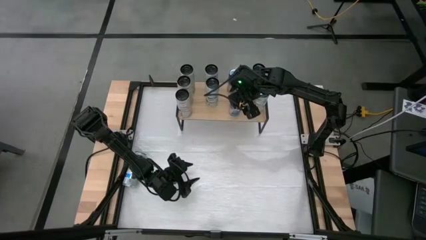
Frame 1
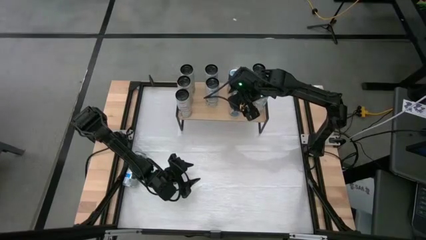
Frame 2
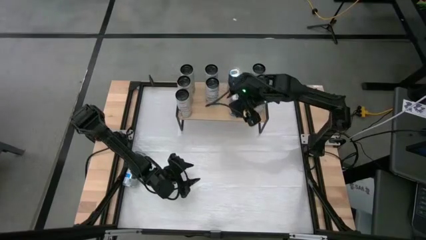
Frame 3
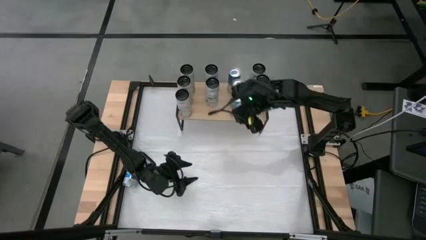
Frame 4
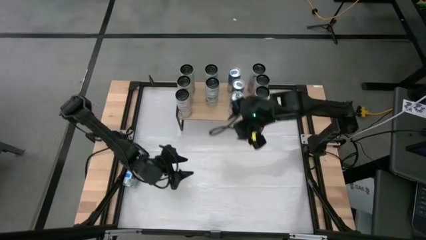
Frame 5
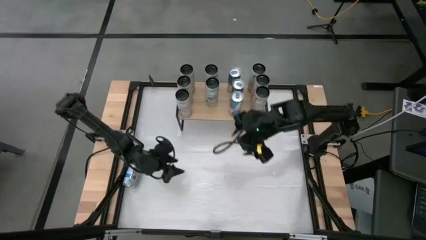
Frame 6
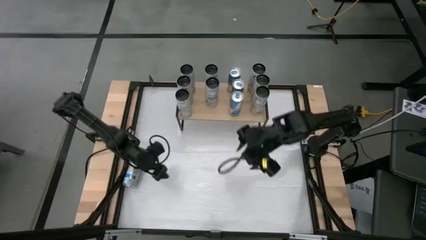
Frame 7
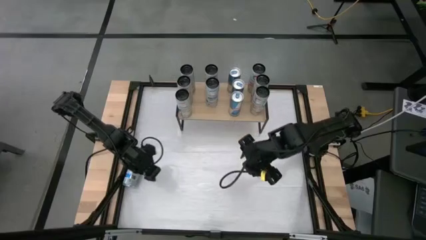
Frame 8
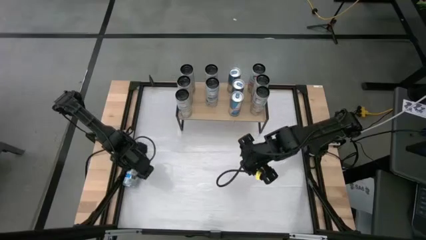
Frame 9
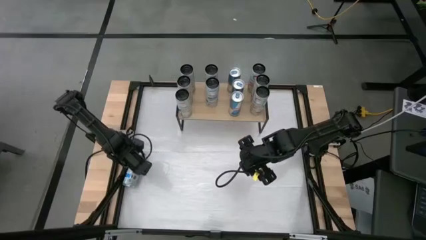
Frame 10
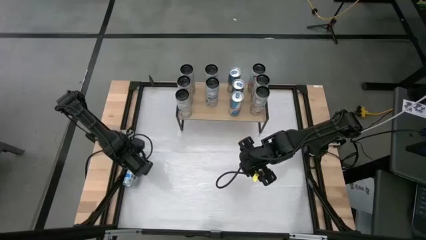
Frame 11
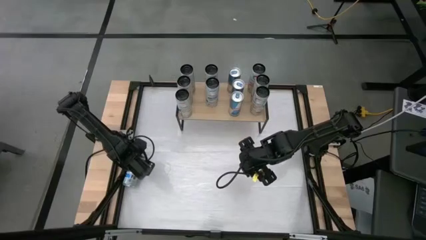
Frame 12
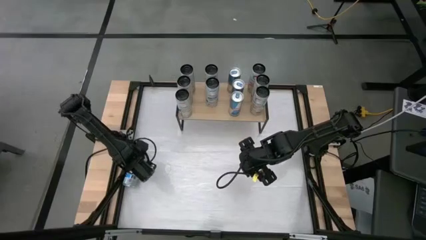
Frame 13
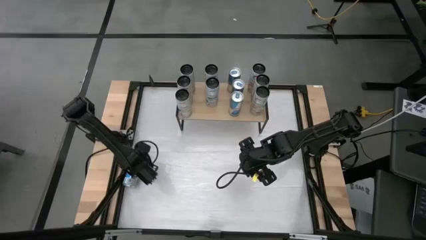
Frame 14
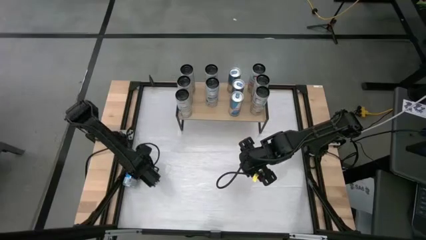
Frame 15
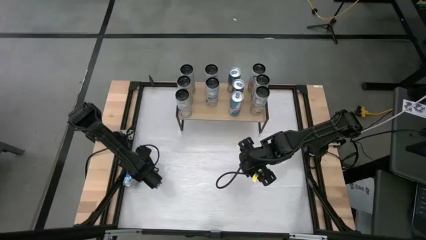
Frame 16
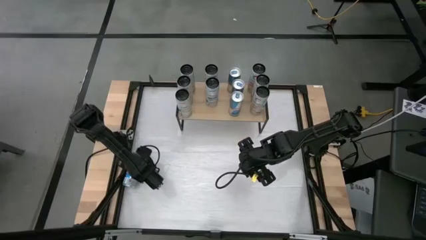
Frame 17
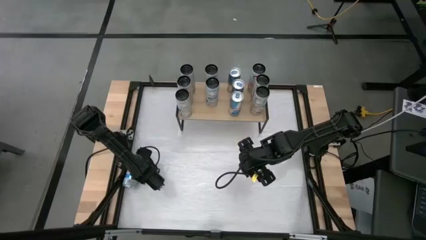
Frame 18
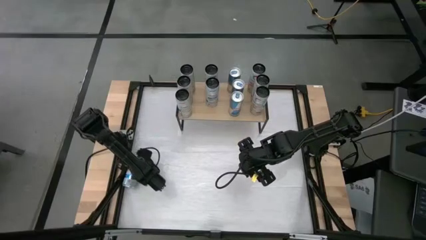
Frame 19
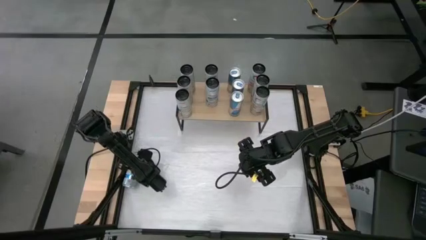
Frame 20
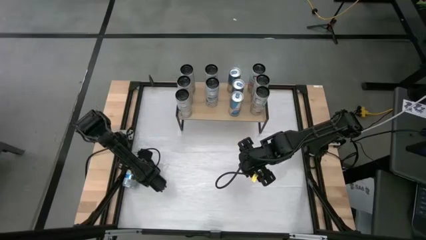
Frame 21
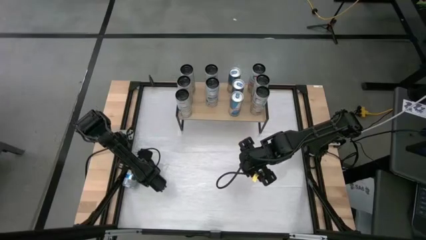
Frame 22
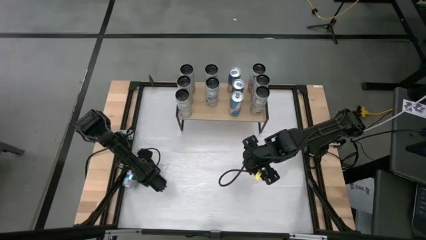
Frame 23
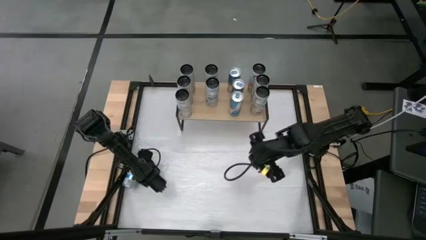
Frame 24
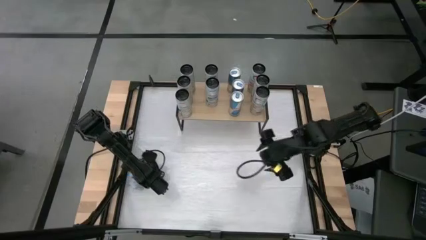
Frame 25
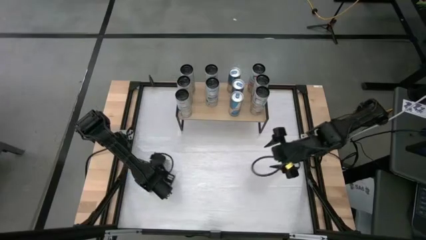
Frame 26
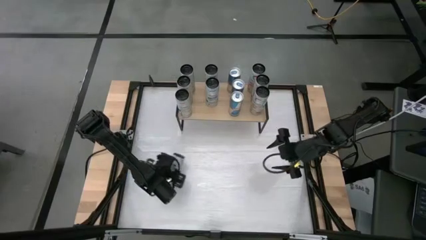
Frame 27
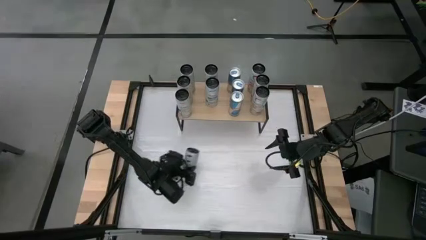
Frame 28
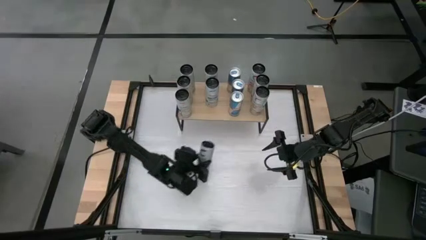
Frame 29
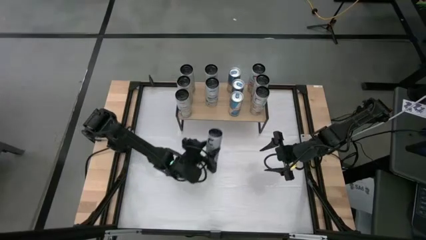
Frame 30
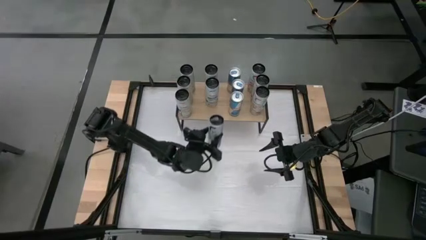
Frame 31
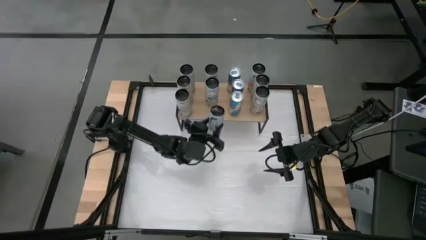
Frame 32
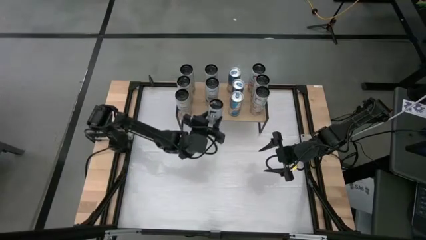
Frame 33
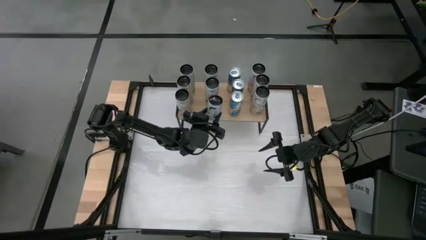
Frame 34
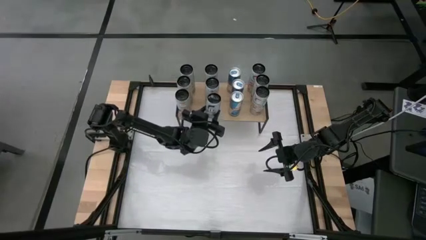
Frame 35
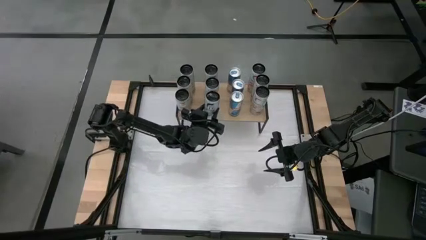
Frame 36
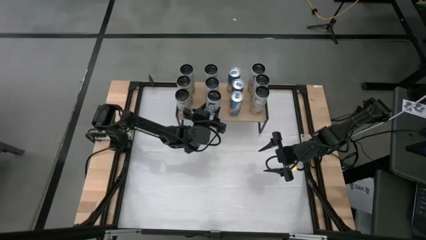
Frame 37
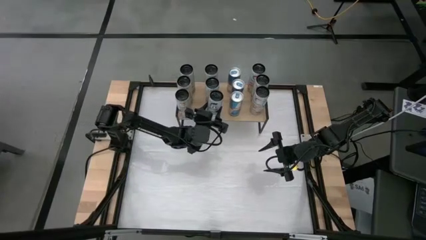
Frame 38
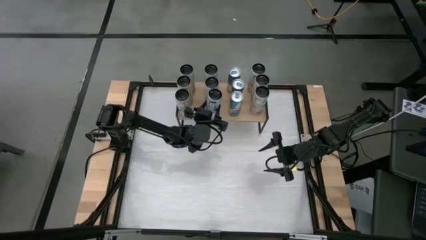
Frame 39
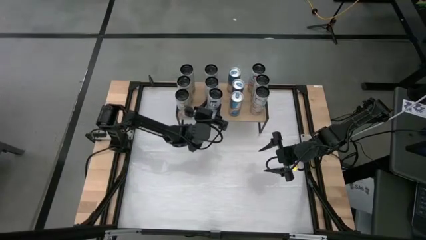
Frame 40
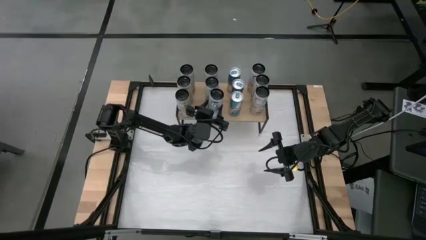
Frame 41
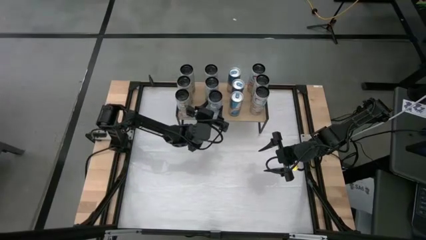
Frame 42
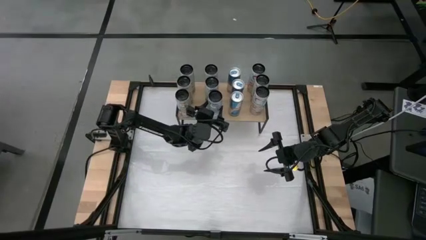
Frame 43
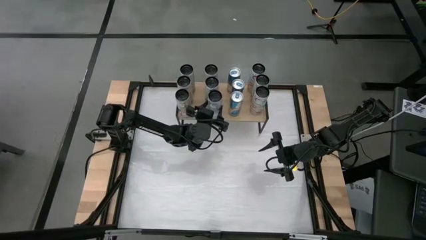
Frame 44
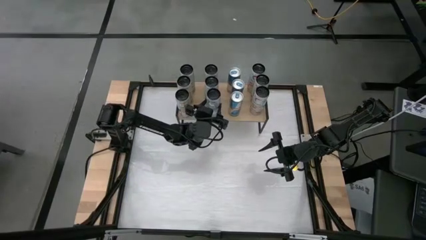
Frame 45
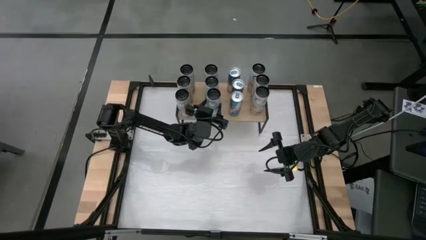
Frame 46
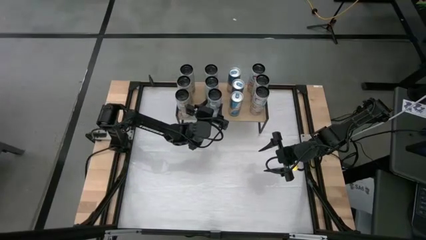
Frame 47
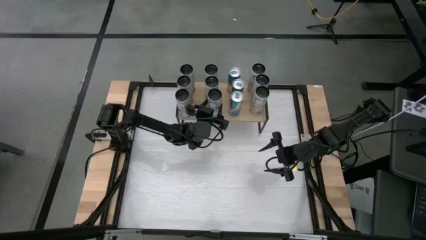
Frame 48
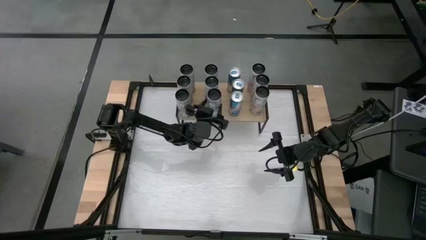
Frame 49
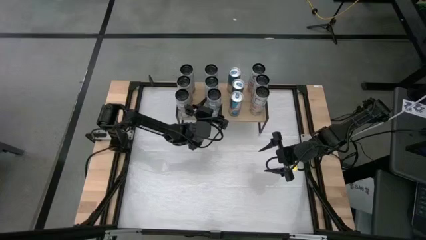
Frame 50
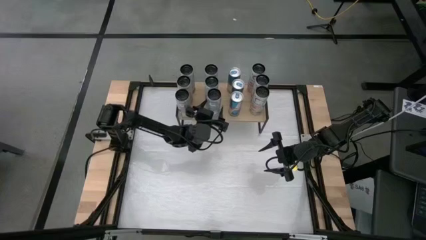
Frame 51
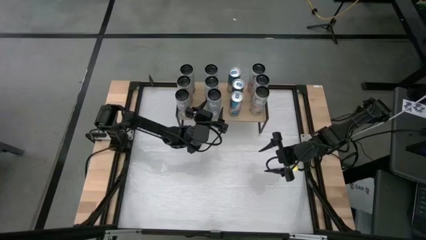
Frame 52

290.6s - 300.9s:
Task: Sort soda cans
Put the white blue soda can on the shelf and align with other white blue soda cans

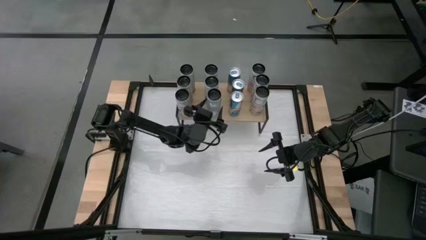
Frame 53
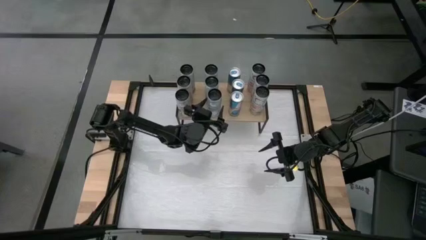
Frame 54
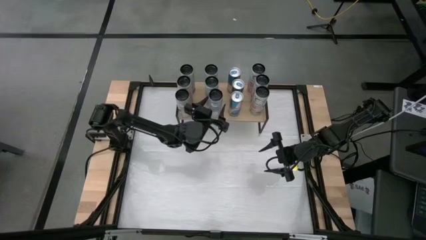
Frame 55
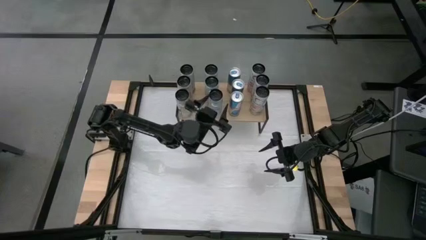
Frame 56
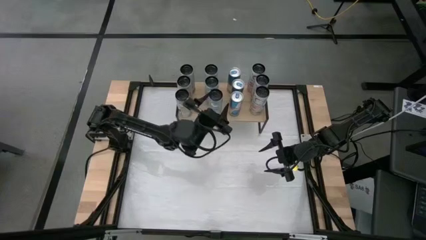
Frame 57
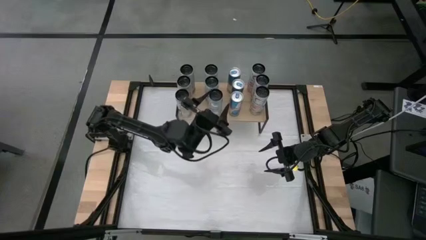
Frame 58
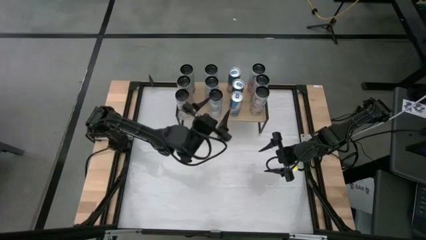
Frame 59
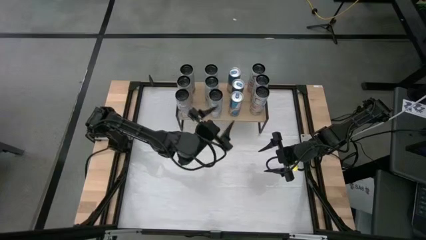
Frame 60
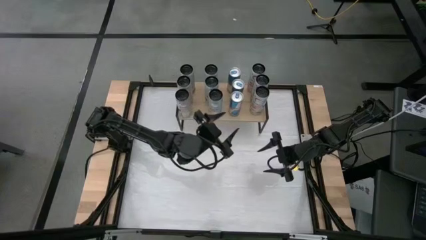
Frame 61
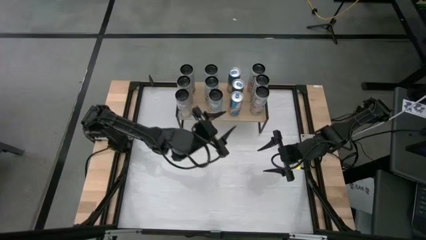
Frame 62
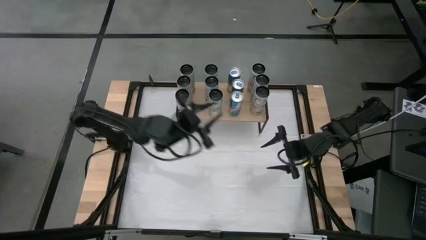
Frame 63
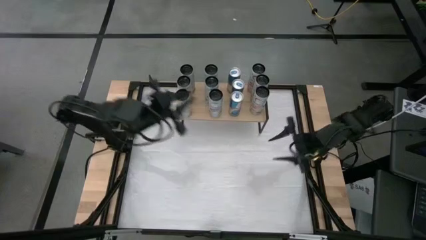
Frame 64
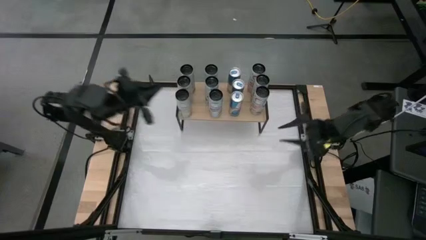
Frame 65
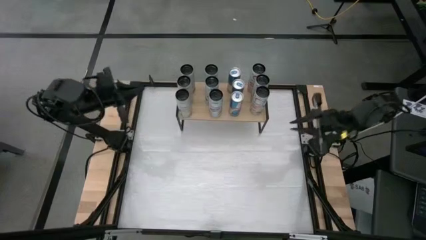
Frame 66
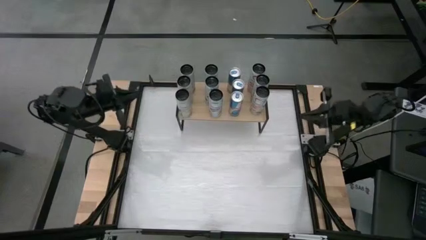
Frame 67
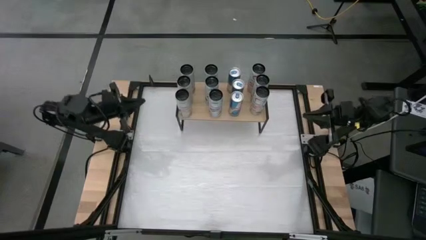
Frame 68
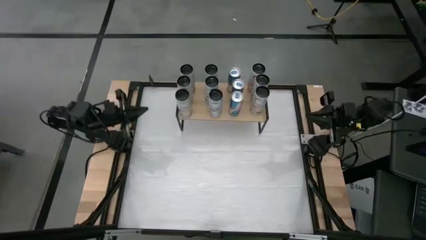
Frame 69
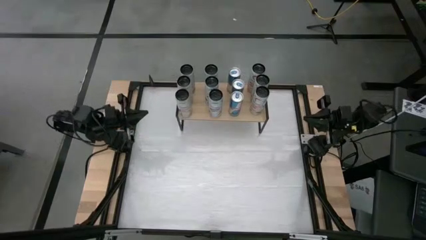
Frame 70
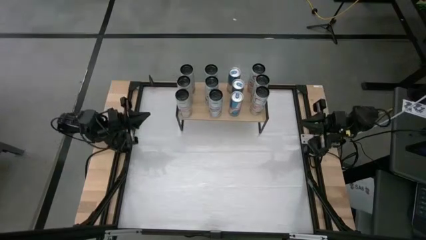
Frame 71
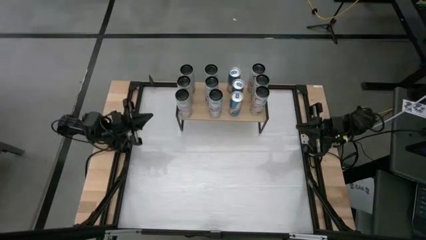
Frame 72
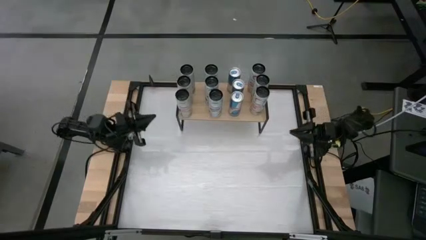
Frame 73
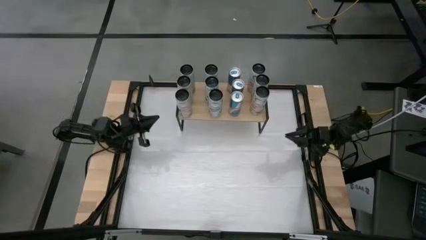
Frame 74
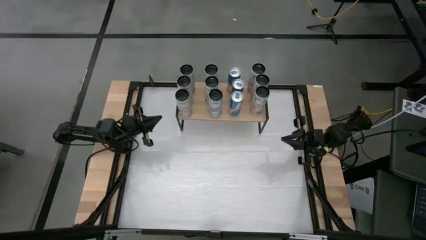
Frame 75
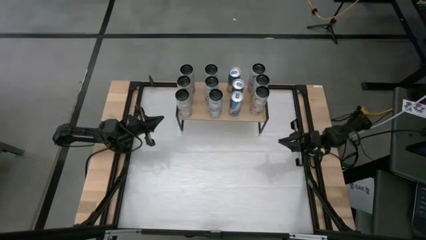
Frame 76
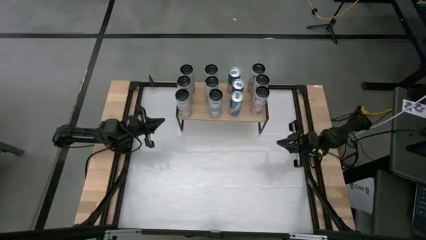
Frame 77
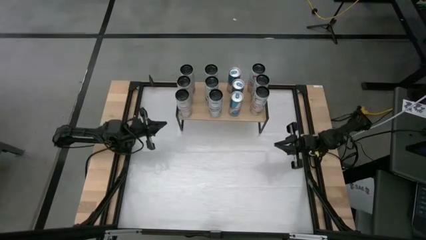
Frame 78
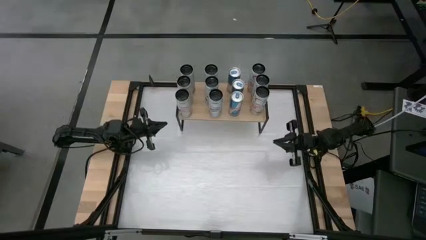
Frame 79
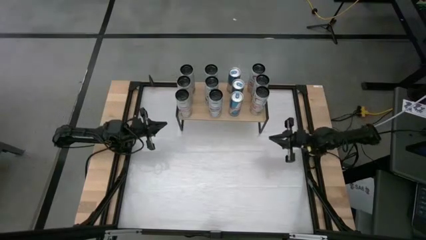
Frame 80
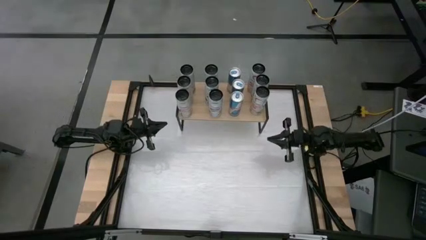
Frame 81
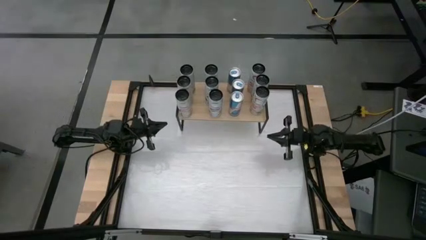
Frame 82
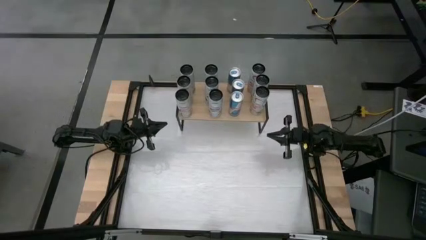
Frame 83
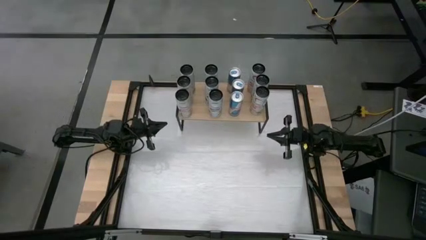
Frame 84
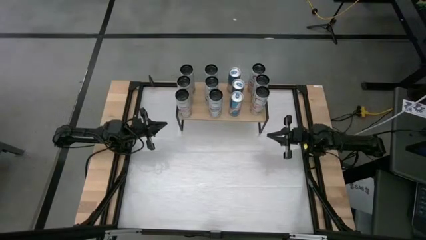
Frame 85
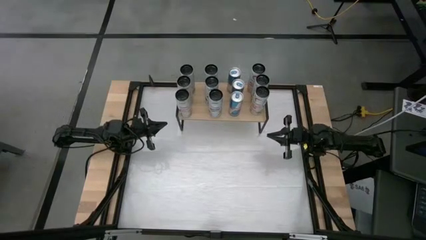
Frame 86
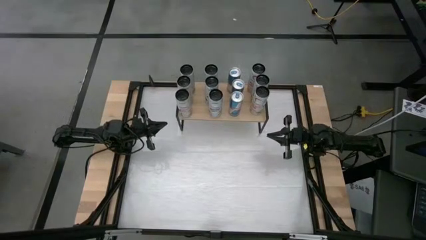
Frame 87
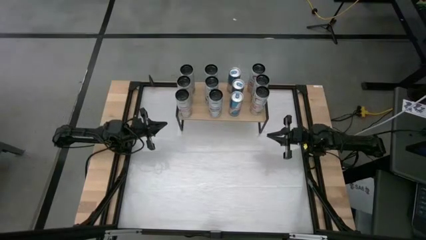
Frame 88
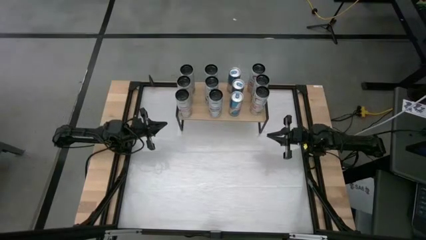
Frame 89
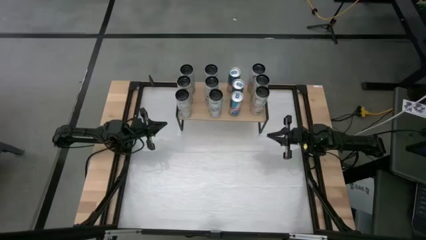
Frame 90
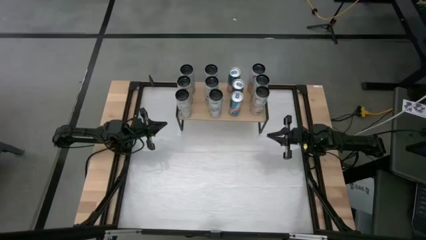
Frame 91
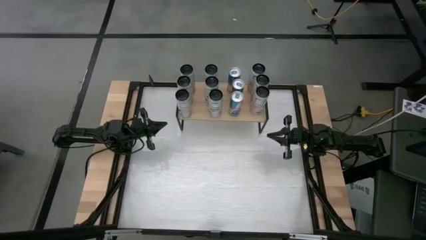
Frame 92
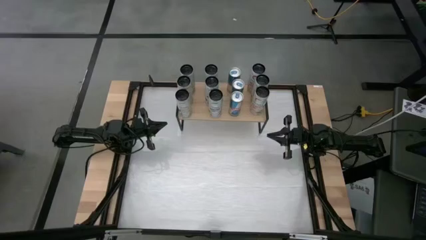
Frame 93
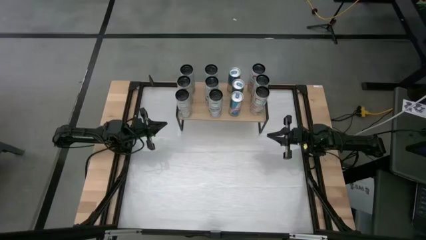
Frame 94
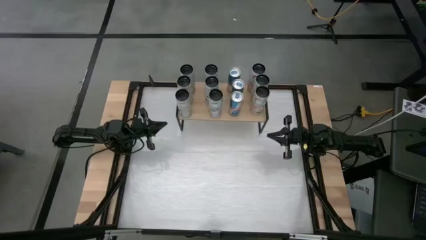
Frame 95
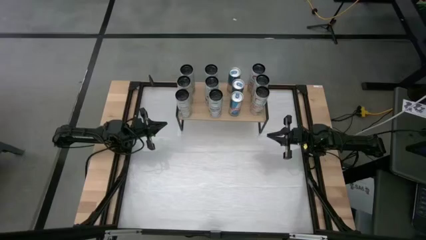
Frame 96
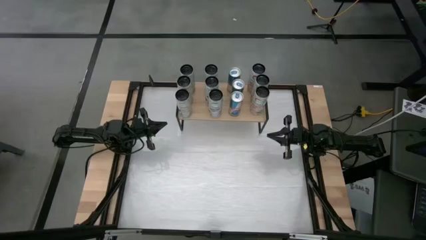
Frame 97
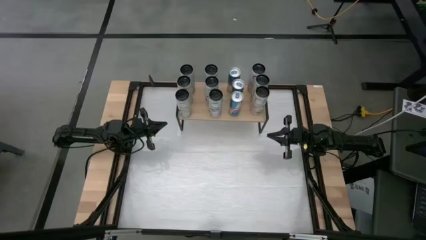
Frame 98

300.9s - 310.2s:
Return to Home Position
